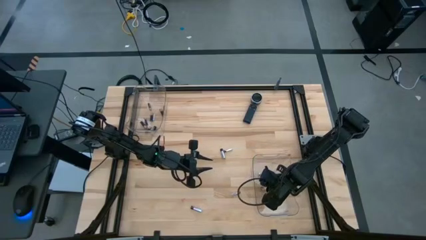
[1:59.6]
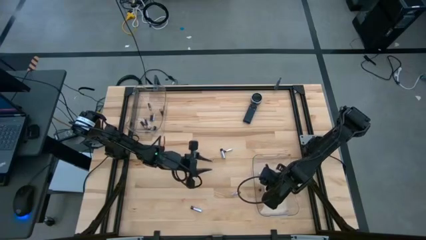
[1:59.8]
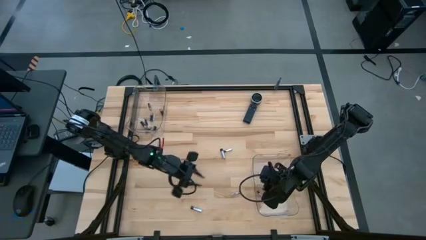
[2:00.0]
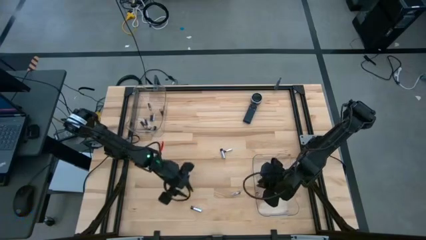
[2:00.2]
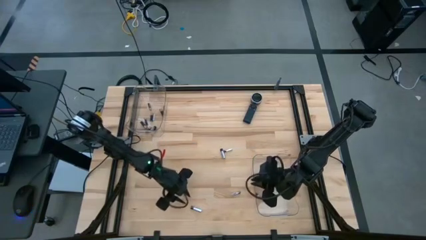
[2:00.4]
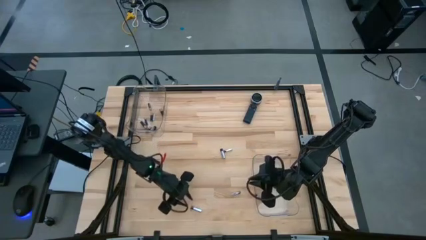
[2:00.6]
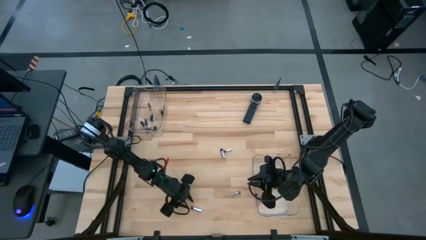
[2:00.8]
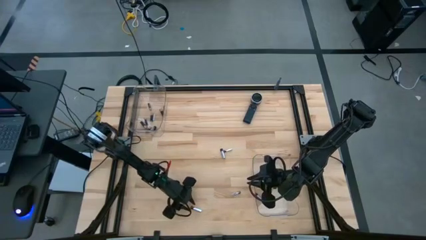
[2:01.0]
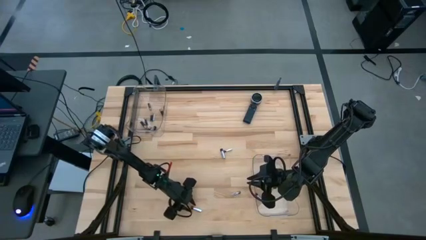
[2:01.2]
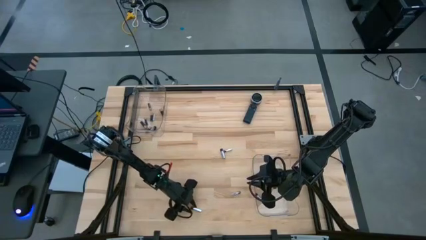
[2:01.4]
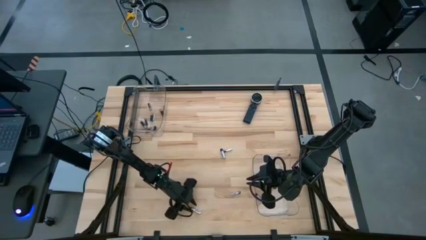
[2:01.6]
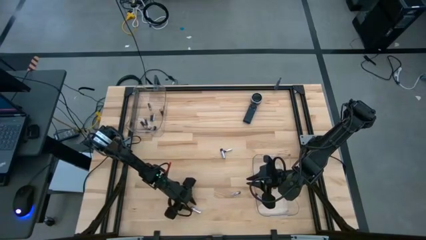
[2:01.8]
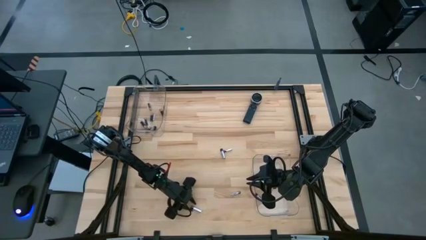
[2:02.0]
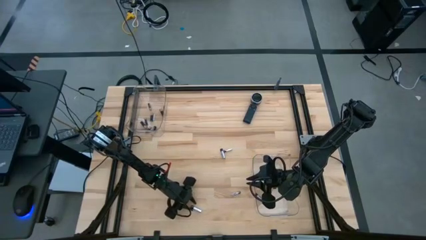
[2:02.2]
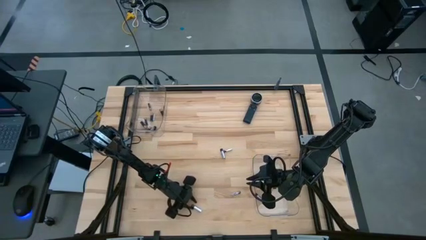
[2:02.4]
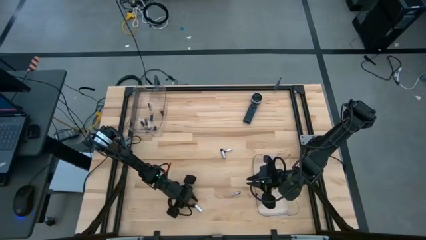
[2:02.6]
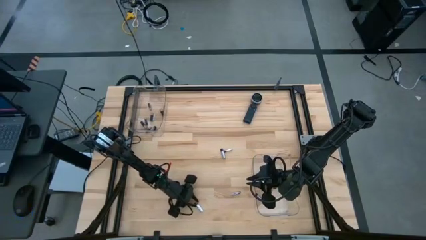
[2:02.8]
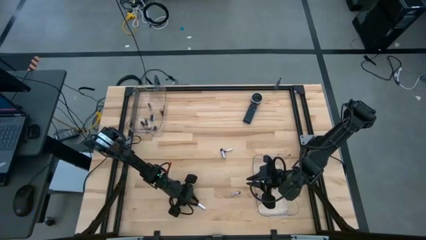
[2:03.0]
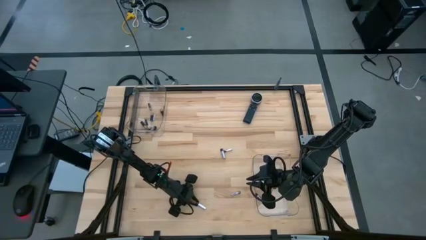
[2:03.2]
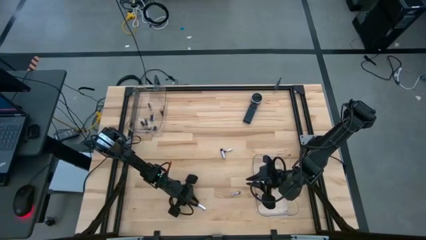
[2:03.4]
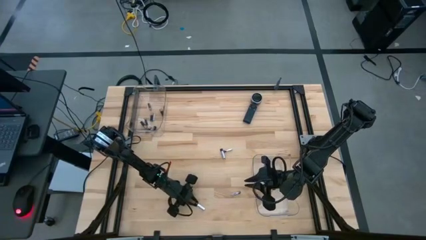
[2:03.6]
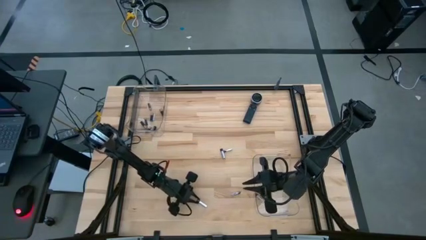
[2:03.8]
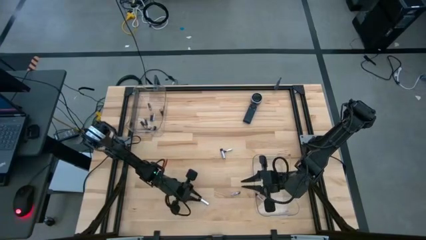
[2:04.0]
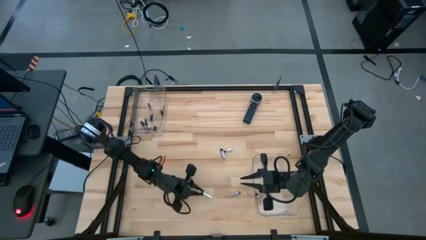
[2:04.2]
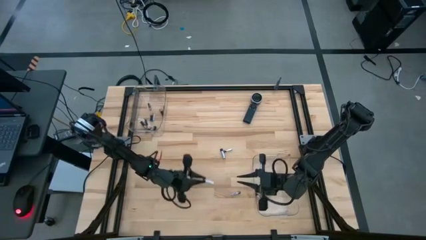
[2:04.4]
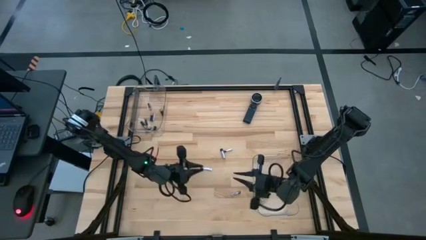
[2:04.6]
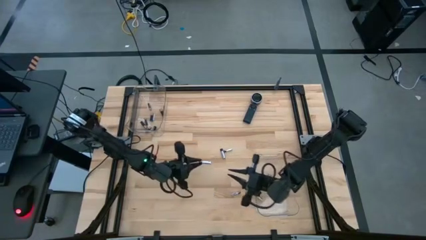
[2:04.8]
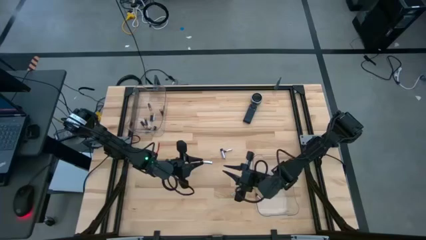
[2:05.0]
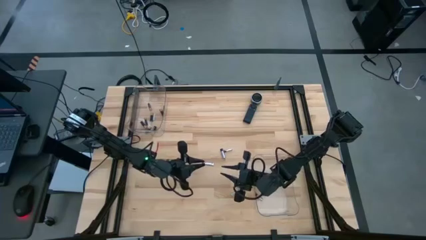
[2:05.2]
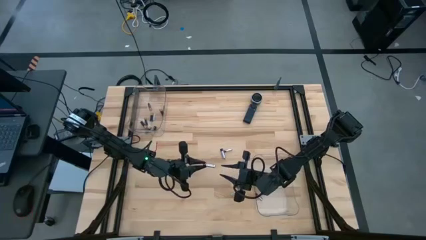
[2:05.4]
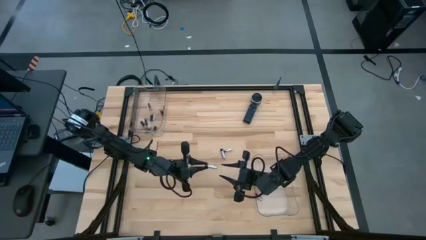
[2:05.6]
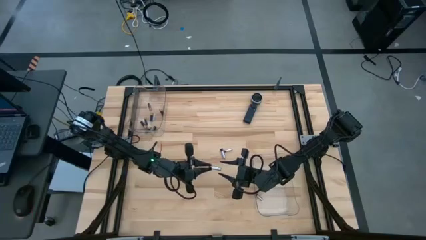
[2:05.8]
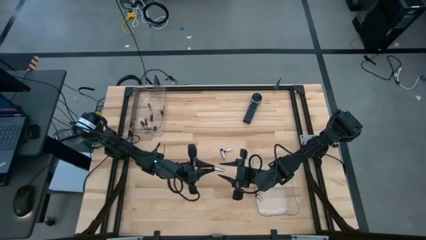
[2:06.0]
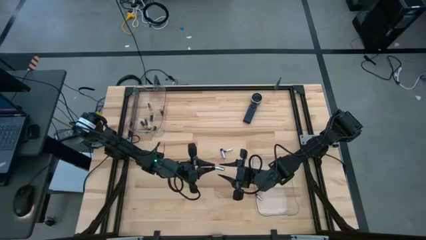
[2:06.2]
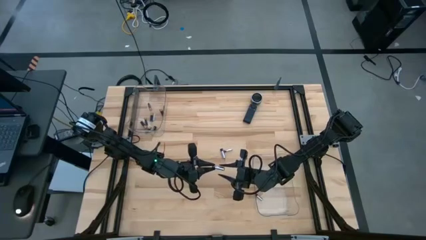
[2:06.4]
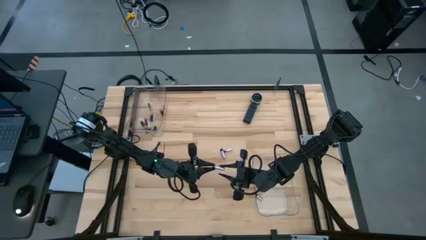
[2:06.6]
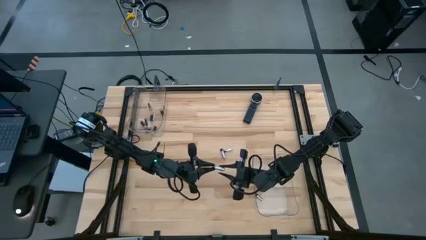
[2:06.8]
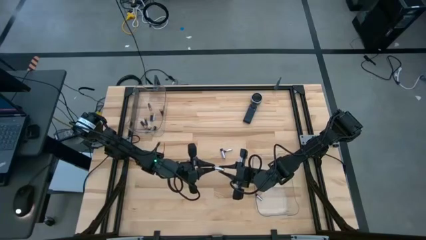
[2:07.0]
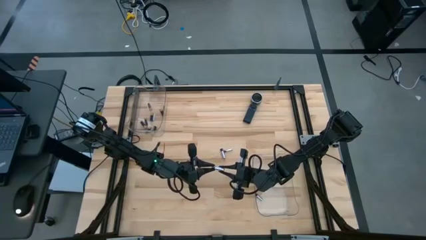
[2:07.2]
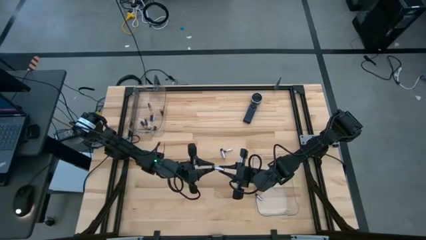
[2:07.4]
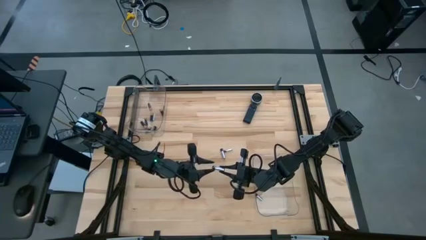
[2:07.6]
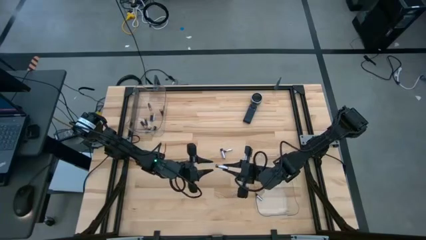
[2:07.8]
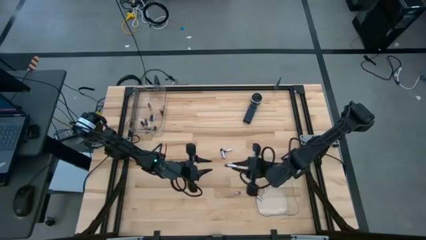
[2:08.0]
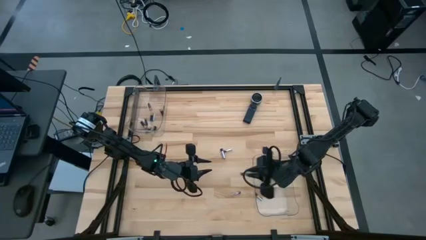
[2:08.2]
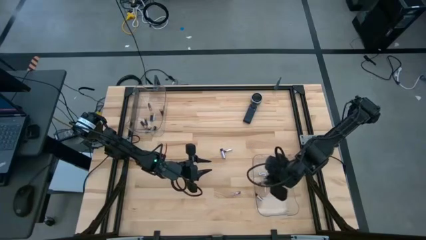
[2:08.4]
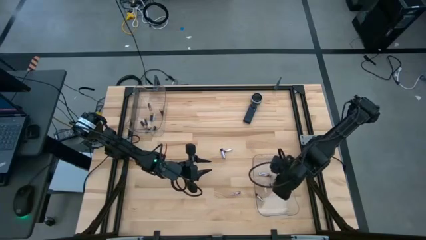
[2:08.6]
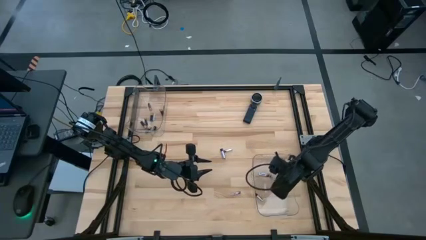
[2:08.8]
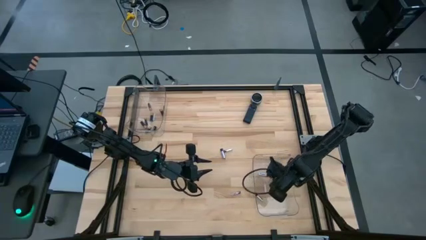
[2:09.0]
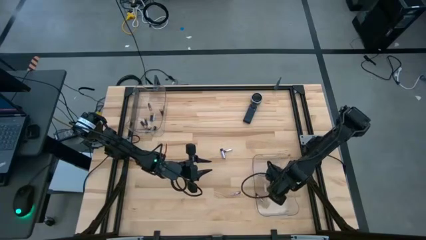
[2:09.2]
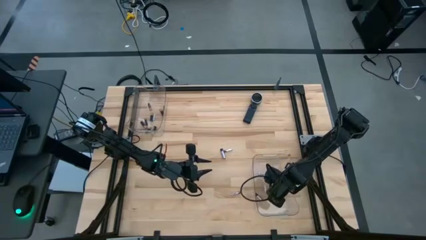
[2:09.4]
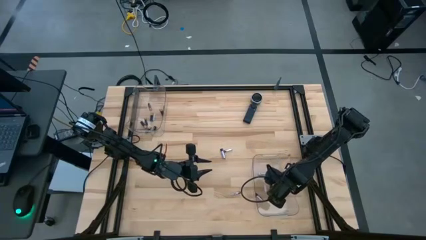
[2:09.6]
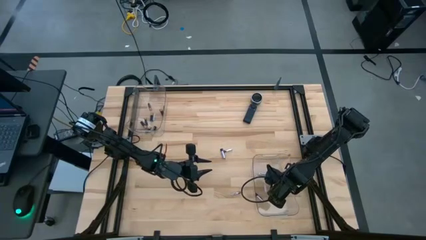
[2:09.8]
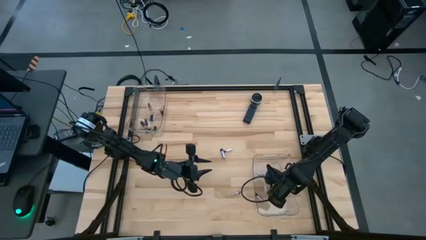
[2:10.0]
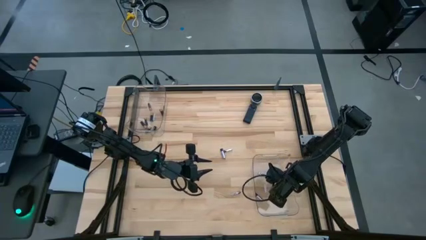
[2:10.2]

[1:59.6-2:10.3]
Task: Sort batteries
Put the silver battery into the bottom transparent bin

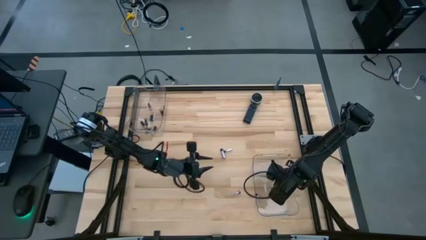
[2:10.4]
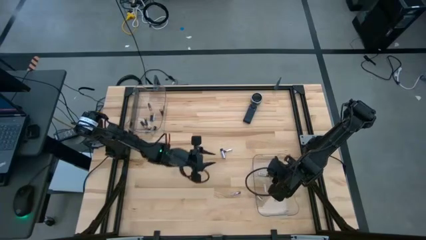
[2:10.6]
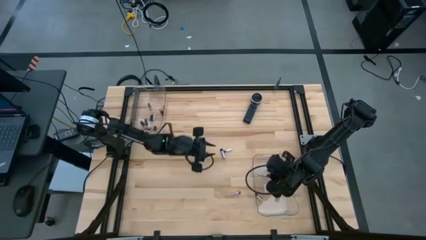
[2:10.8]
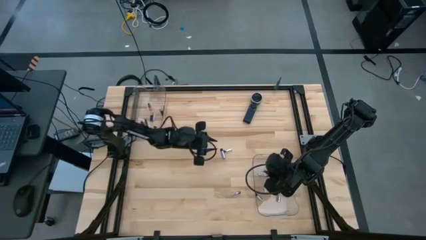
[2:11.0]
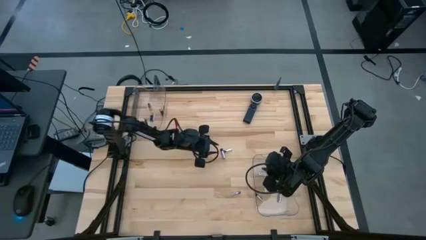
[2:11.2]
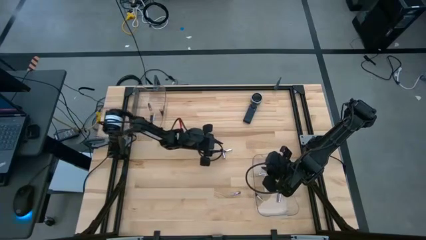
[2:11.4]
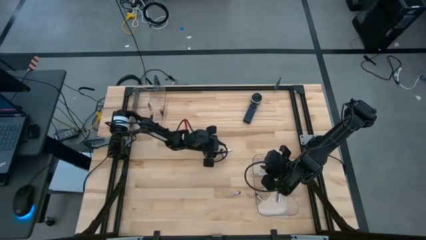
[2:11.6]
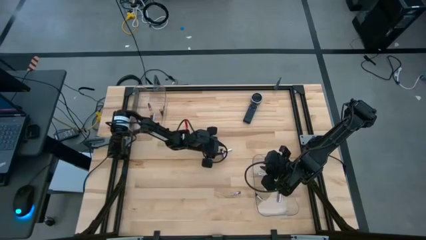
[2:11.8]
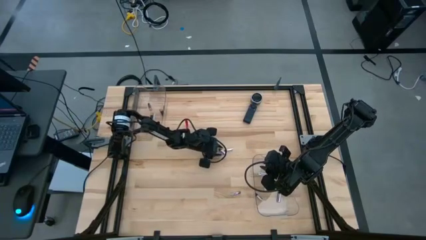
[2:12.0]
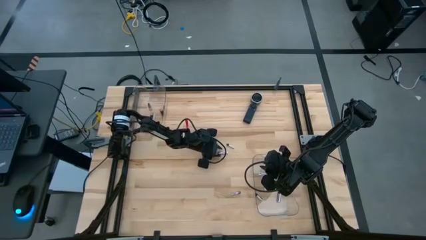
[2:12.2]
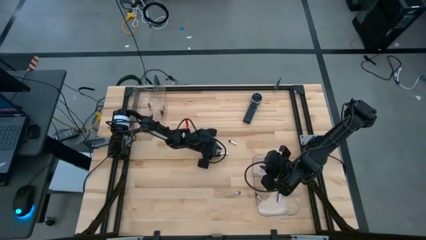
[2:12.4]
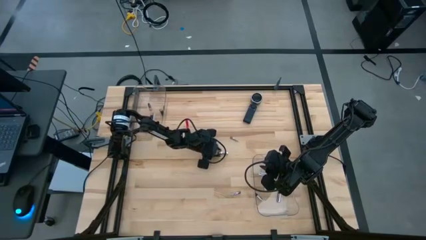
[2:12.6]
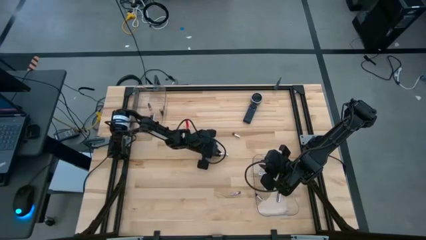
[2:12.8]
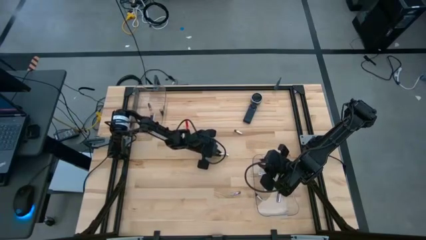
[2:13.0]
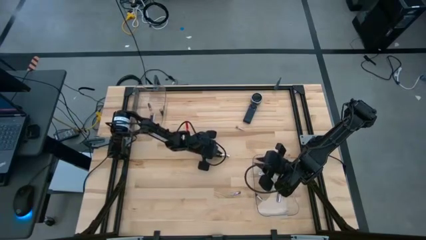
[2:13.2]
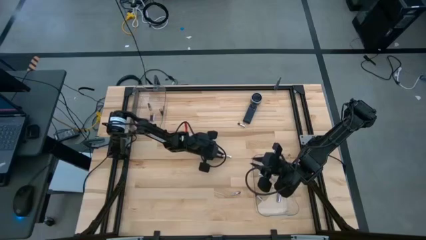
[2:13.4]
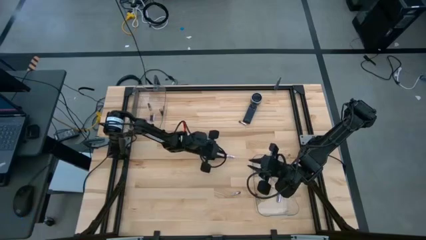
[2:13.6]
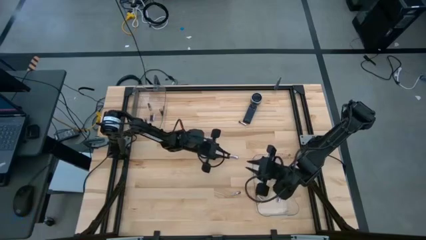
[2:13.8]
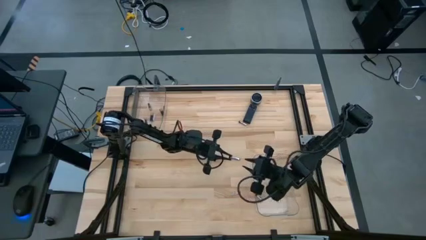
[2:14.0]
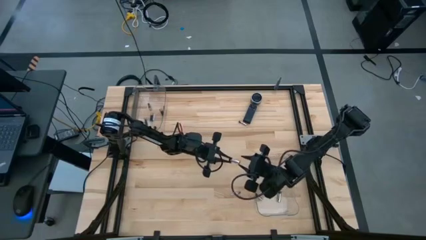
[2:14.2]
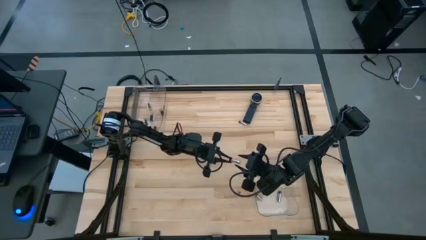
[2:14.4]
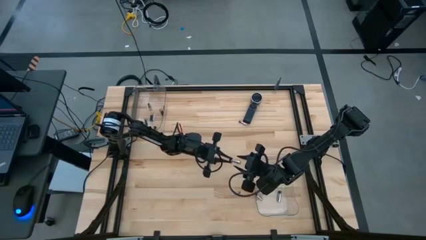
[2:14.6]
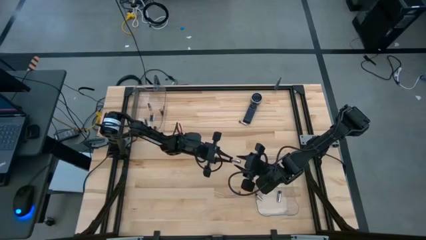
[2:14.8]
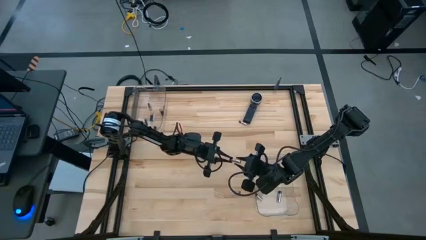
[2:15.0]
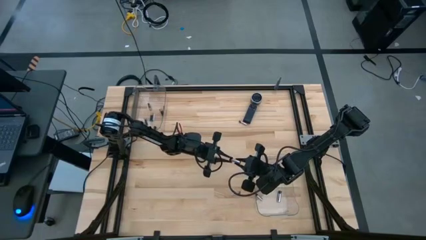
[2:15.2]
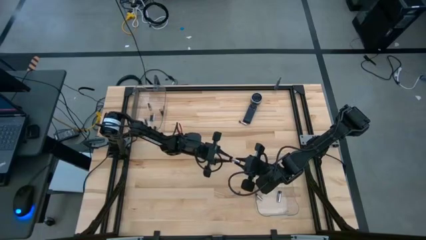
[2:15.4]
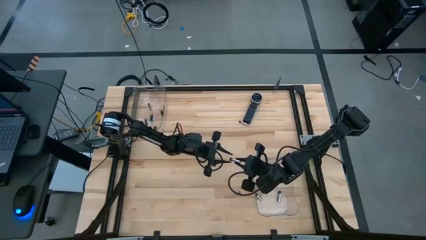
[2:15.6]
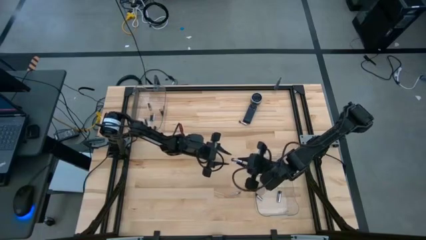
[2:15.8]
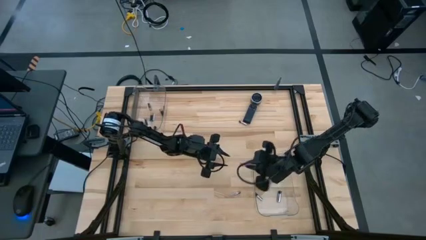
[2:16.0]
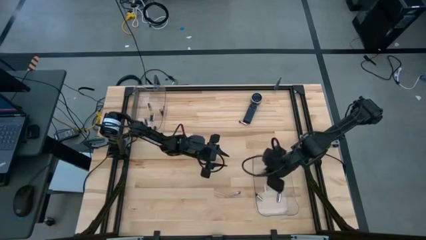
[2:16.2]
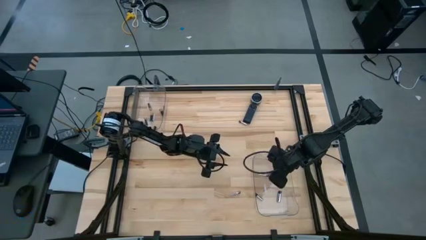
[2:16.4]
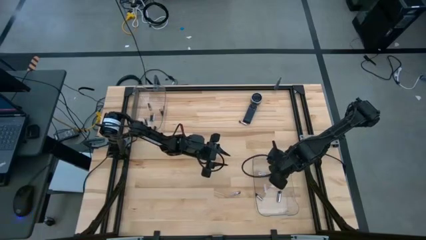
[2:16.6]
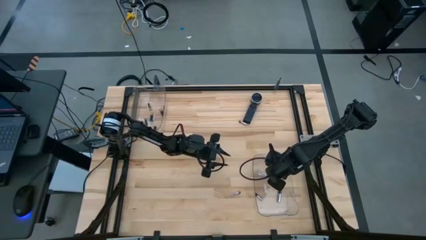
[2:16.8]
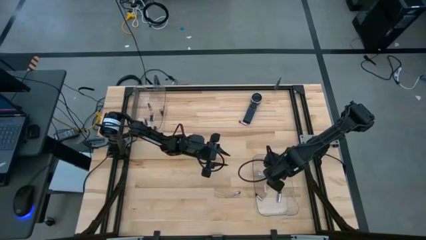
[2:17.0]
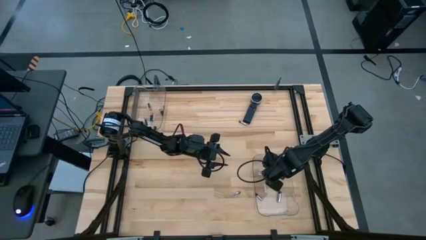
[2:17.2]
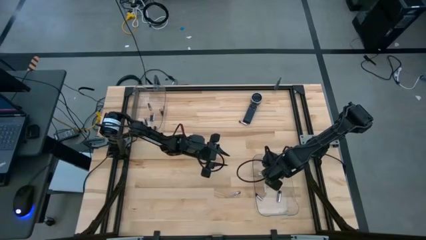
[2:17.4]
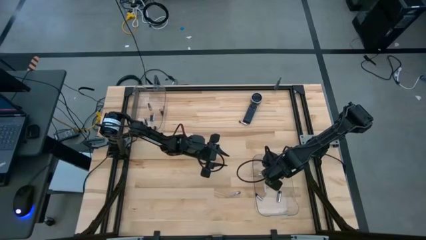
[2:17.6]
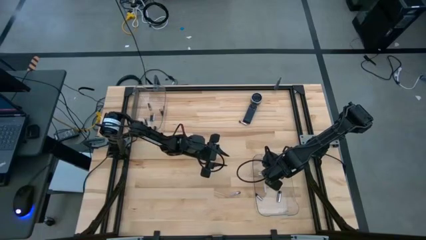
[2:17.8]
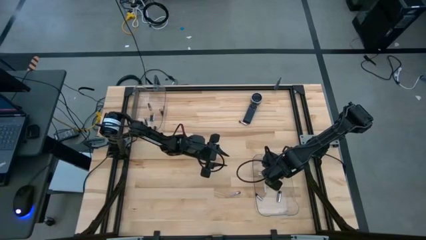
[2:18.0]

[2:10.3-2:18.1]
Put the silver battery into the bottom transparent bin
